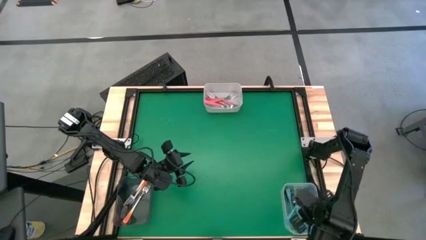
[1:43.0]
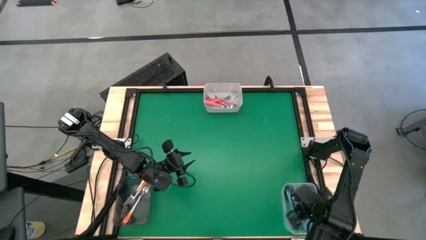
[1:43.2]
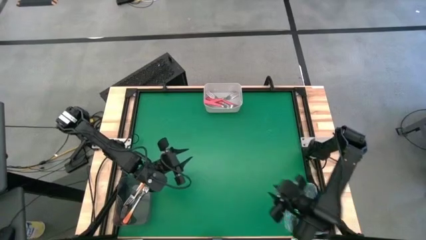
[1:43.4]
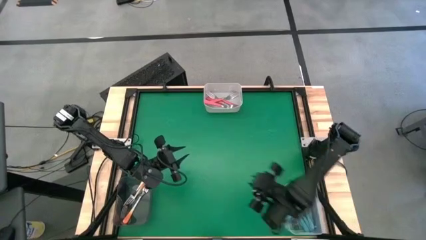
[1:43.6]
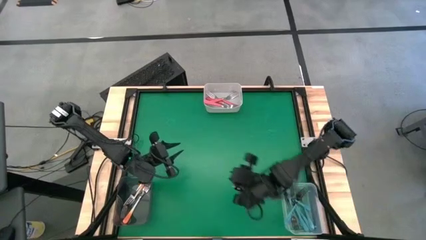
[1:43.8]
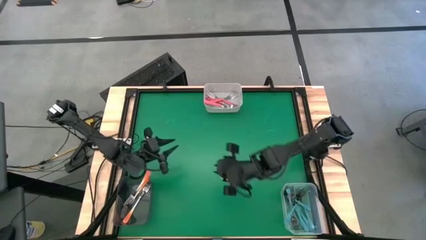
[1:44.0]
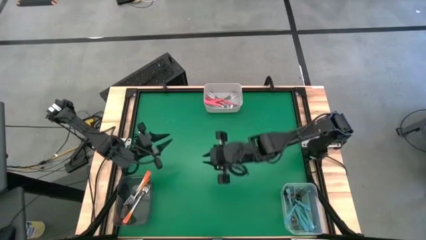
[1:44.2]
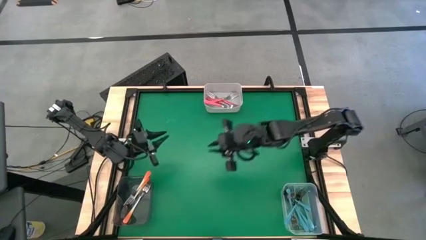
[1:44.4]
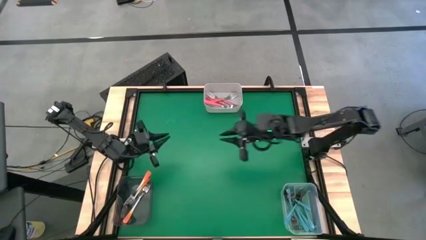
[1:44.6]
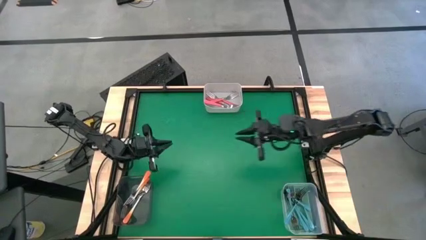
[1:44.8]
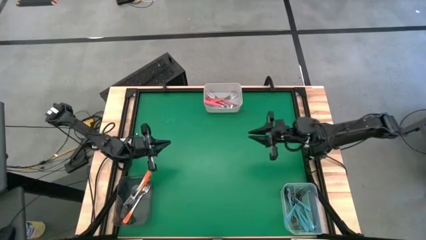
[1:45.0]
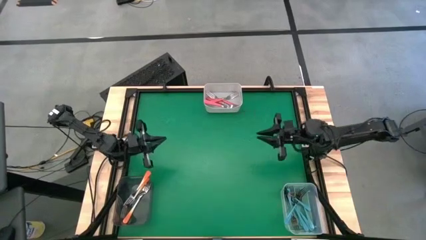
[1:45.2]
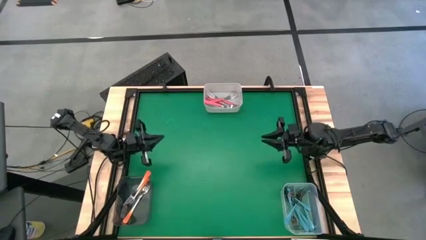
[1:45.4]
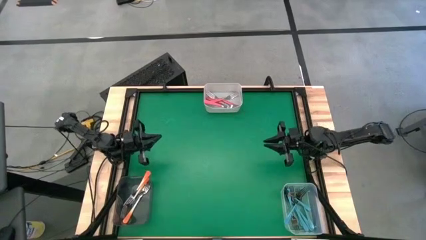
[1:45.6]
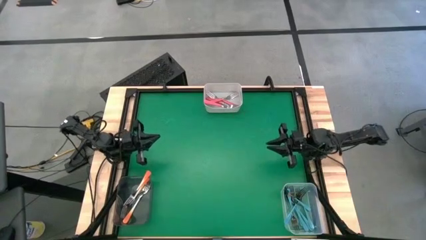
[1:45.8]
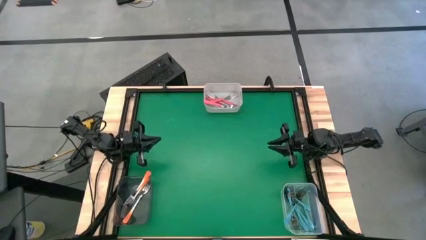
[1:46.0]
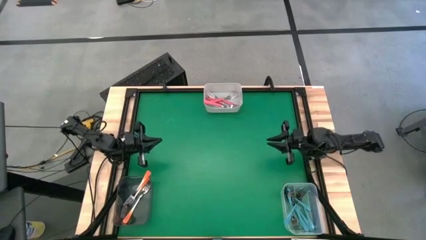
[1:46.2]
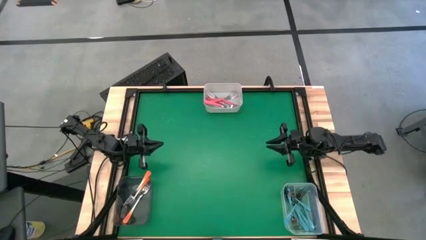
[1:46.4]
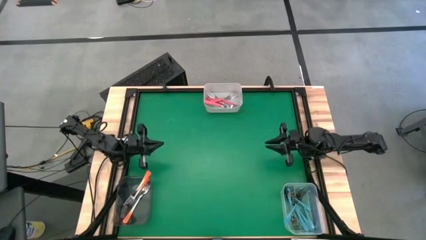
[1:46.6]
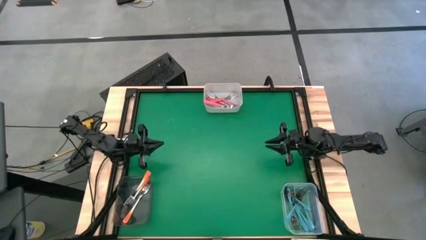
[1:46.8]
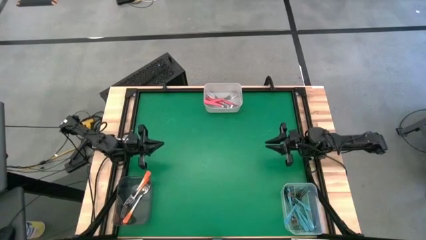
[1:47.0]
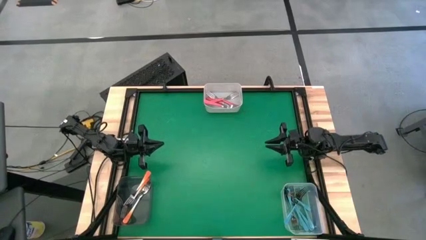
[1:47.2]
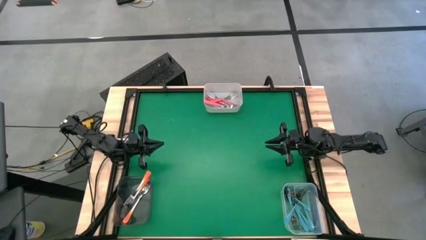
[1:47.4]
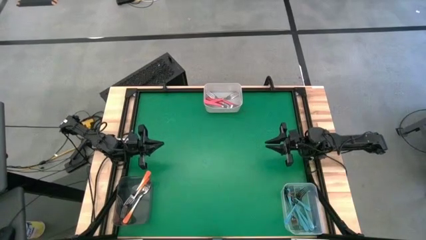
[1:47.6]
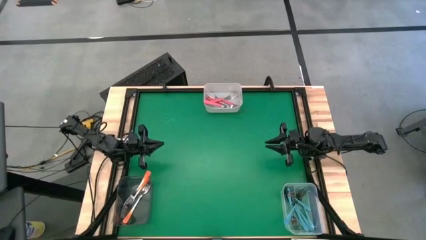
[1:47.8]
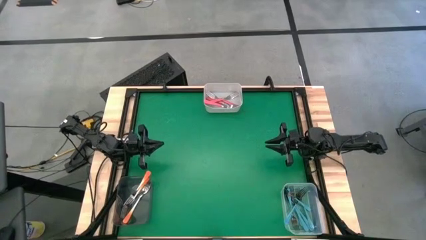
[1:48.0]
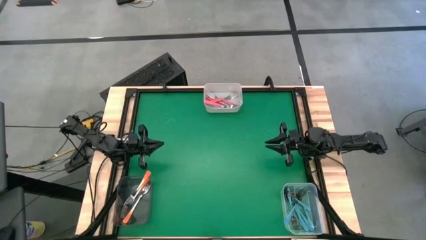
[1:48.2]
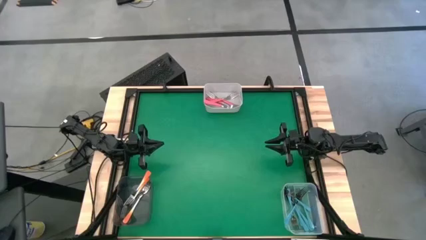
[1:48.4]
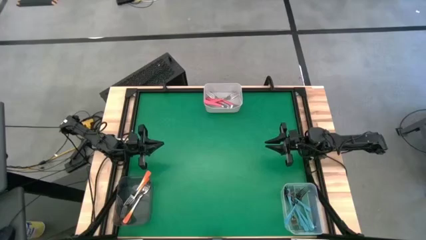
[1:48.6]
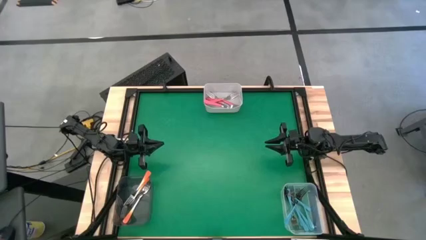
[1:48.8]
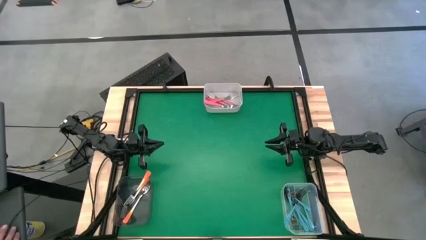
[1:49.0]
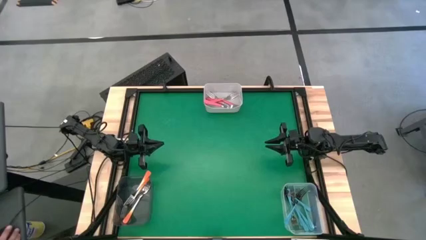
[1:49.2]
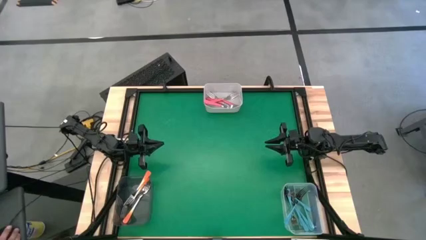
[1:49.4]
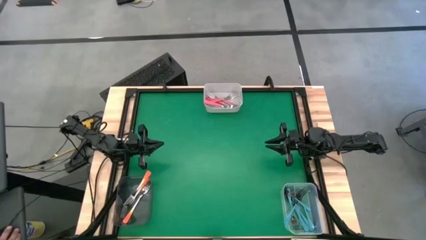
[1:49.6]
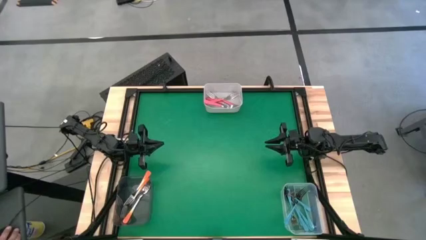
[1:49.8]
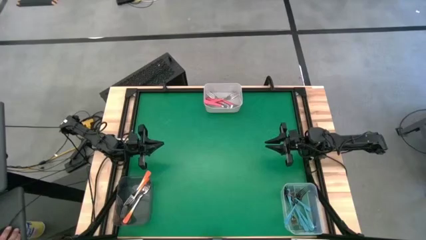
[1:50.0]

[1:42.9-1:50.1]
Task: Sort silverware by color (type)
Return to Home Position

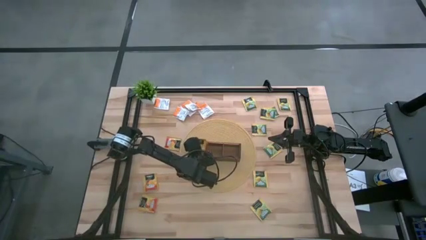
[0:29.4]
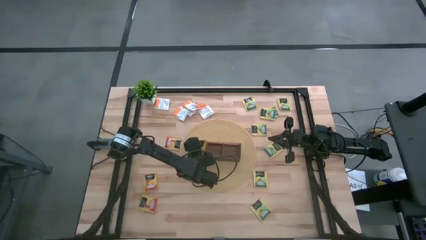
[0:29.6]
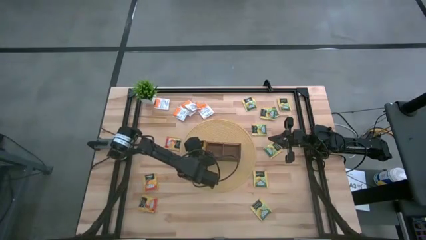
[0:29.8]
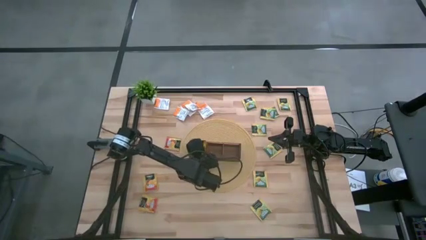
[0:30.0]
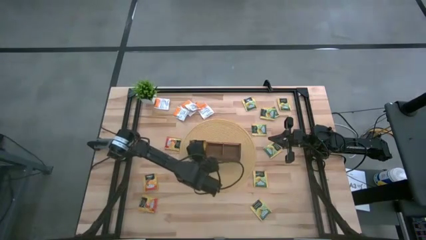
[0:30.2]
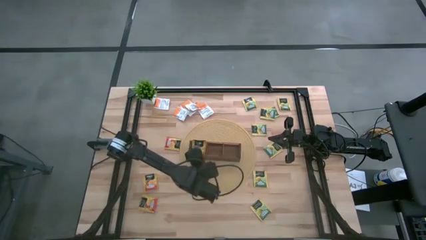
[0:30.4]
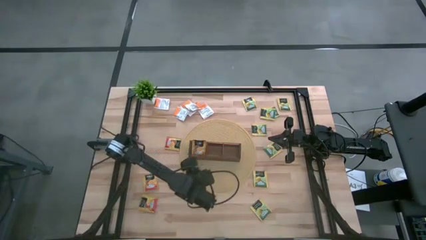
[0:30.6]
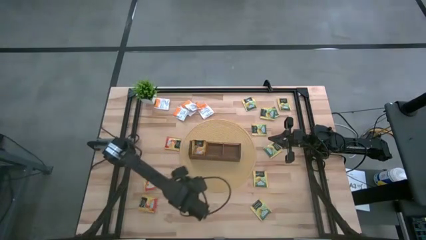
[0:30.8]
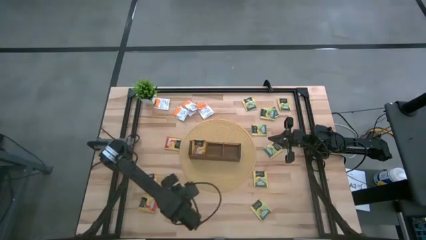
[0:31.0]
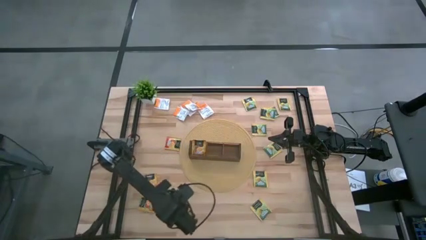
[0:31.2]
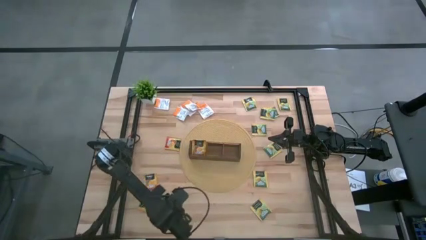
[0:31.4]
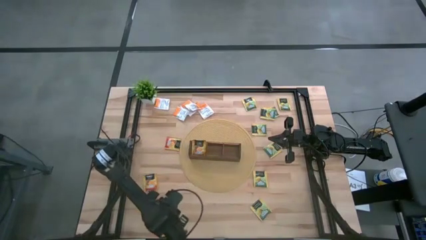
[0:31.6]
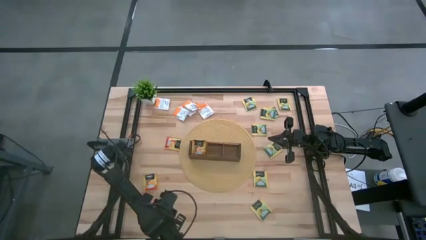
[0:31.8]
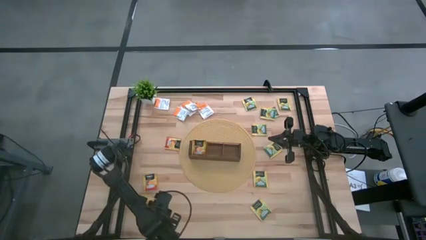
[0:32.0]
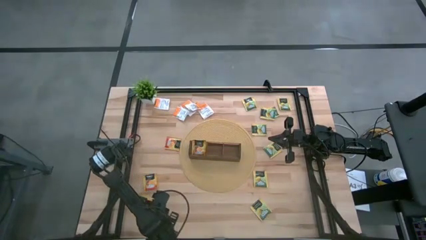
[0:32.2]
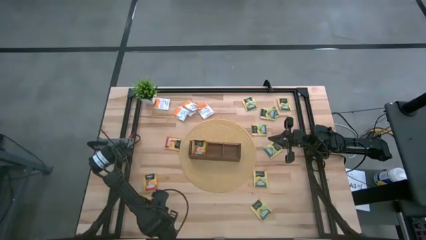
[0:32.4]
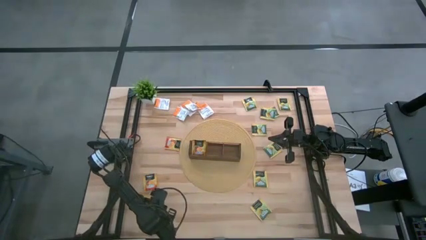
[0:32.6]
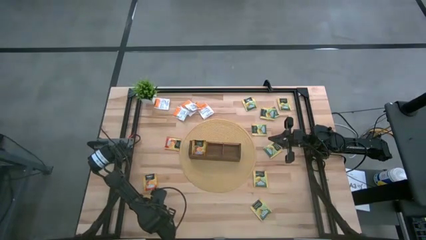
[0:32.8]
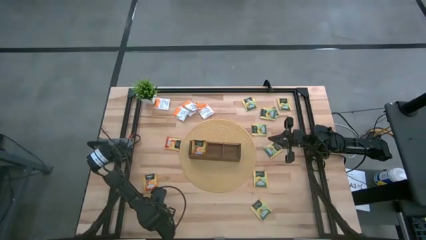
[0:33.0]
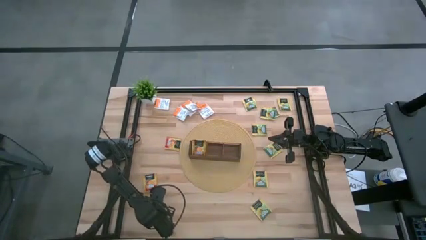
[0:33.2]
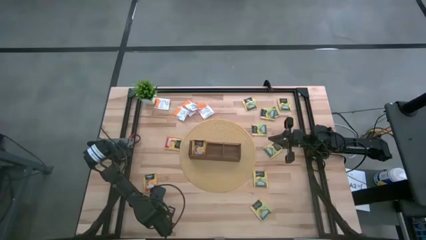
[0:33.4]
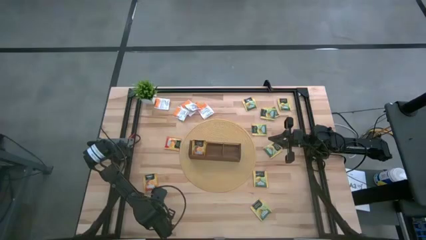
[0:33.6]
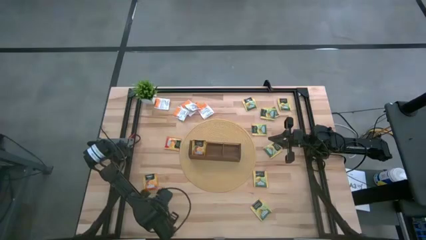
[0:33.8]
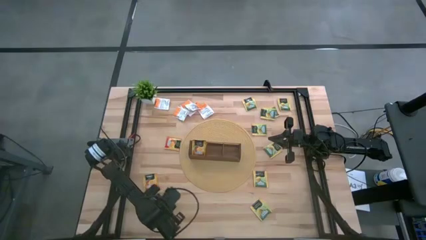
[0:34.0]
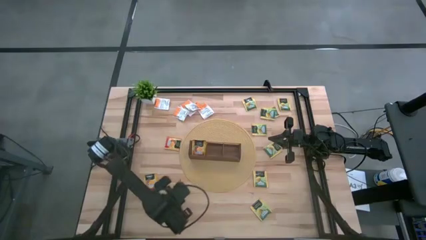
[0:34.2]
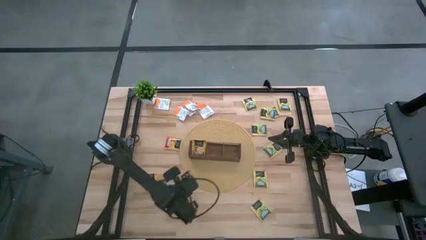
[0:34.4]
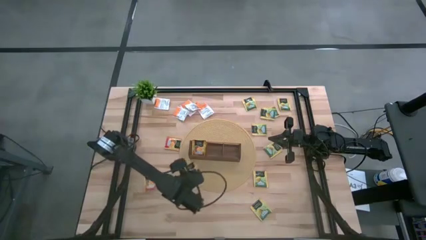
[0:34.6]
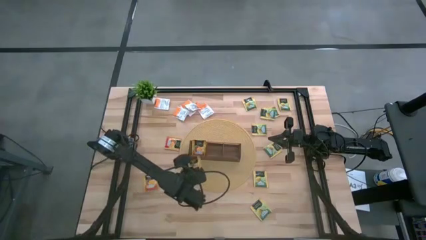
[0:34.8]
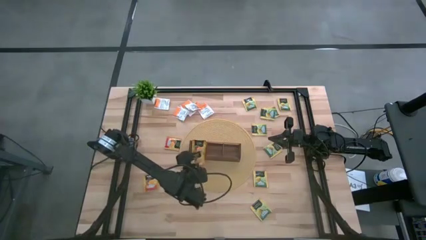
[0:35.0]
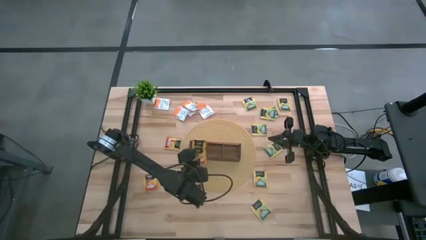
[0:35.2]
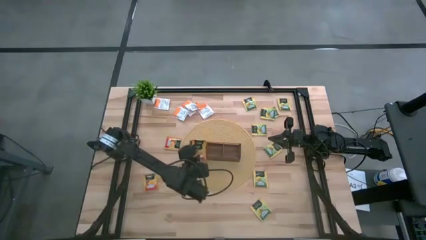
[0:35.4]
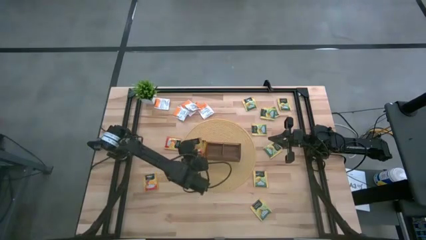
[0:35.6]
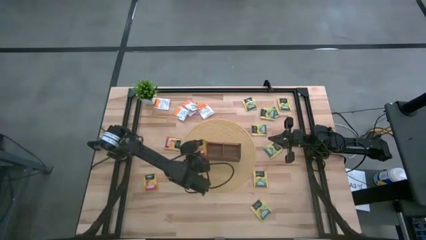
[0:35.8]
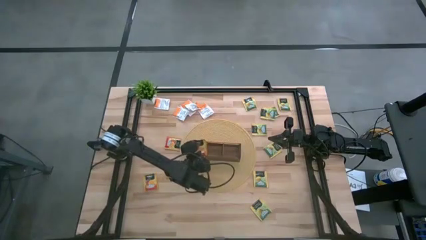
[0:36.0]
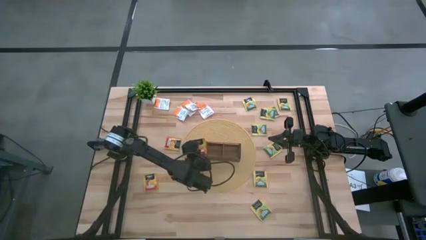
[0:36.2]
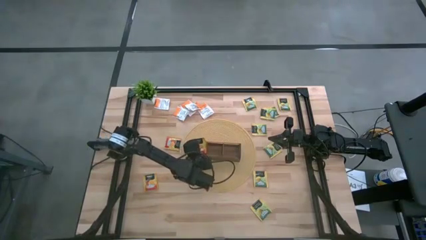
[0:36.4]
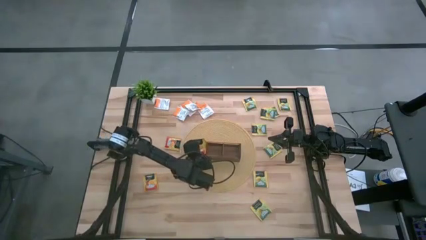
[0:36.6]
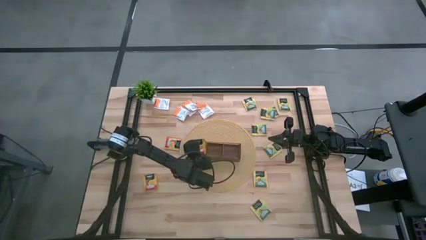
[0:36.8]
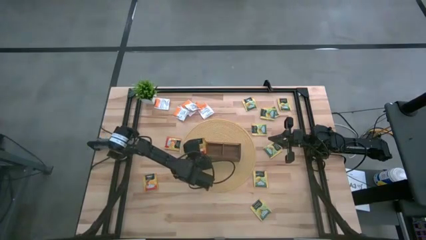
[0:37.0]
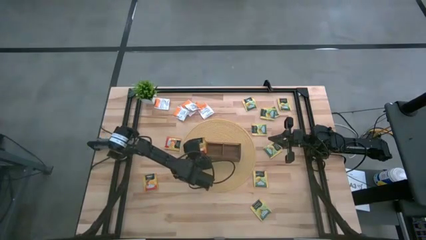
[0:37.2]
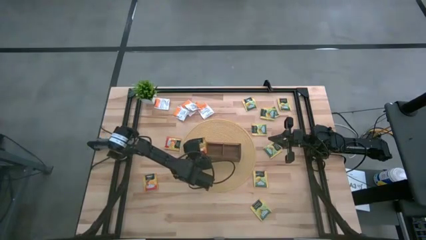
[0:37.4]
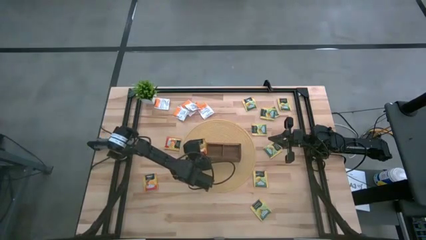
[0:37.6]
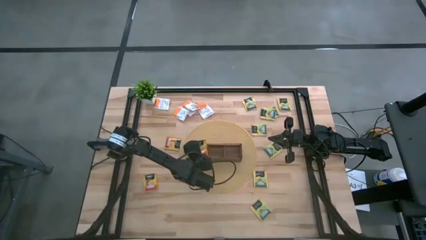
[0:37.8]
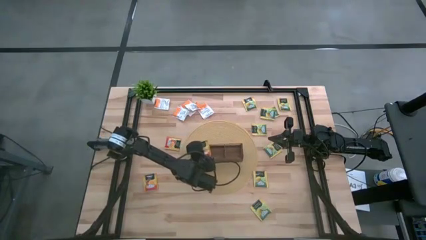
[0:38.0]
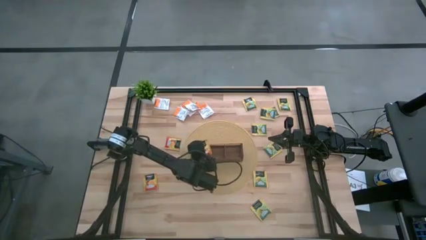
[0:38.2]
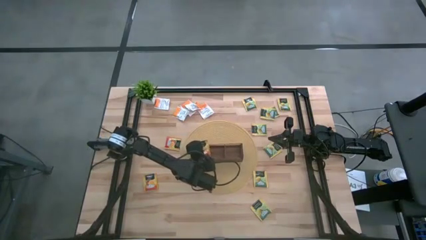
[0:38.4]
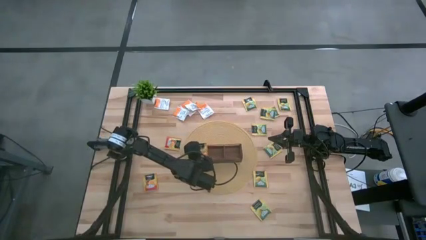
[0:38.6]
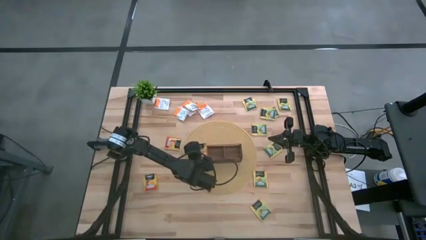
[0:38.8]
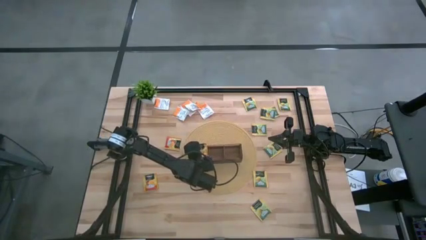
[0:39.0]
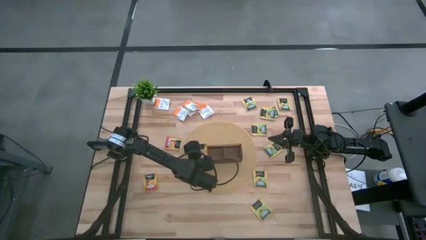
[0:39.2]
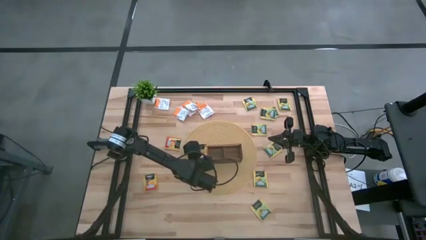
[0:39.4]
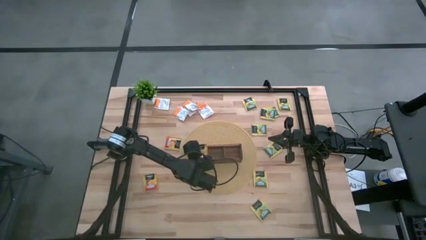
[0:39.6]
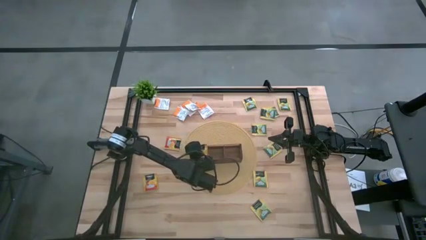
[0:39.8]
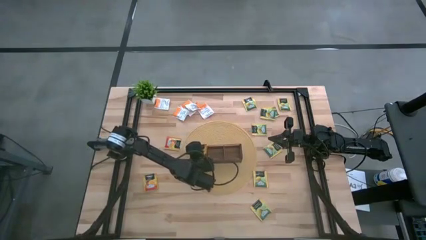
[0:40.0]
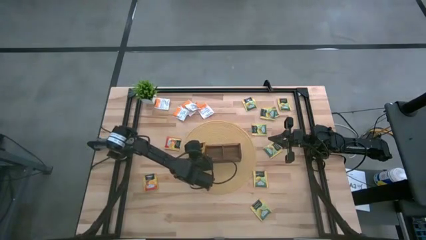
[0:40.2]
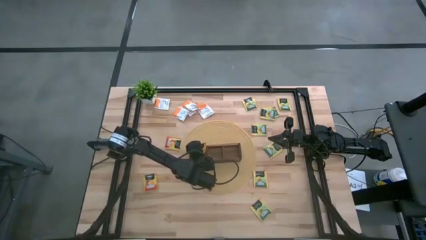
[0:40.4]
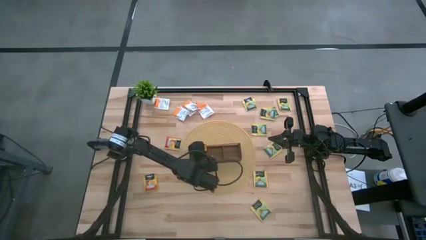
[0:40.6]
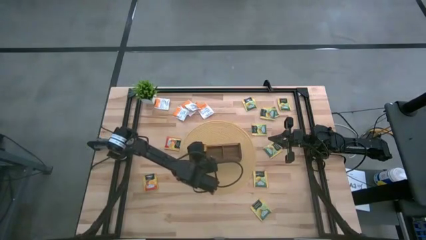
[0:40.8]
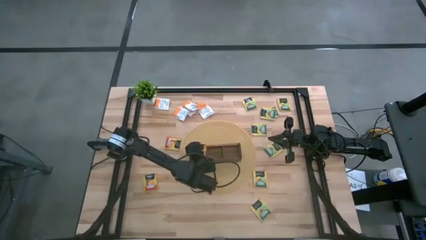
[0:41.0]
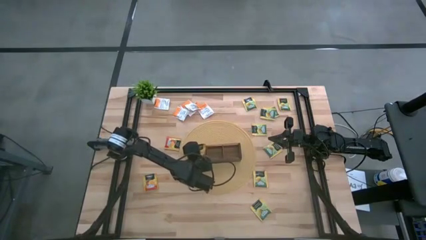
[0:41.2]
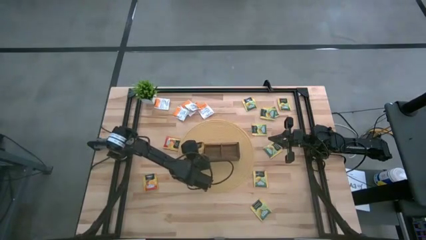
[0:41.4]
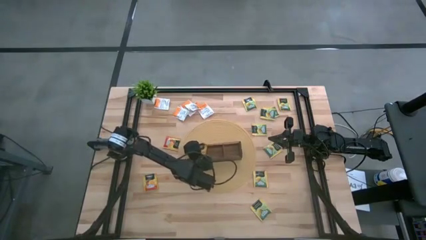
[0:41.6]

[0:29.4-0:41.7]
Task: Pick & Place Tea
Put the bottom mango tea sachet into the left section of the wooden organizer
